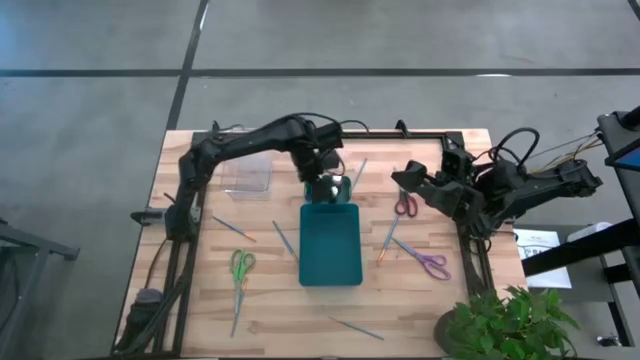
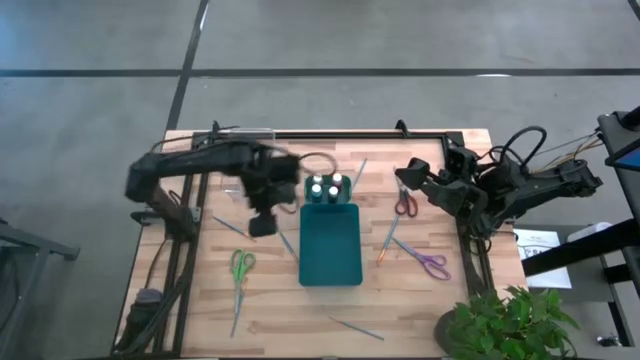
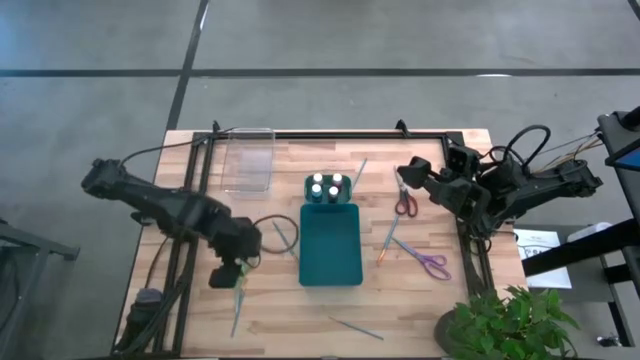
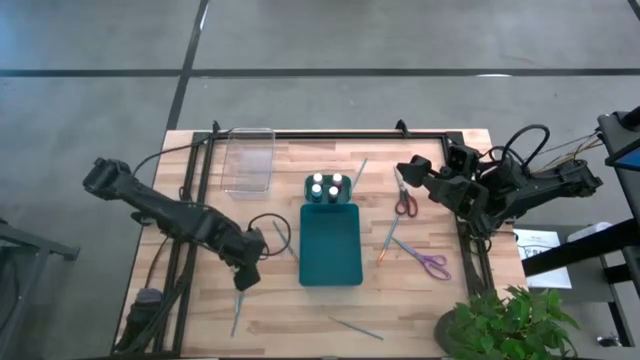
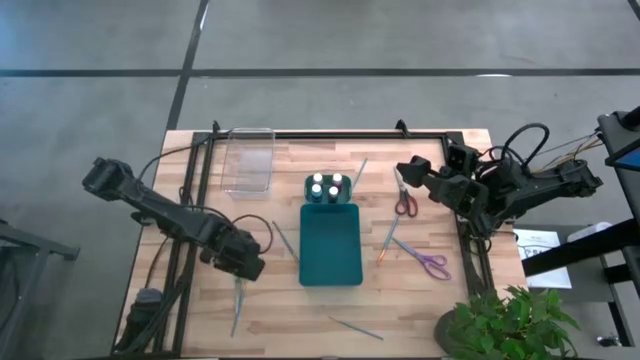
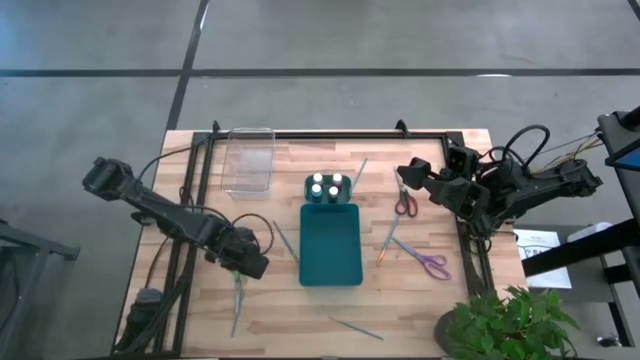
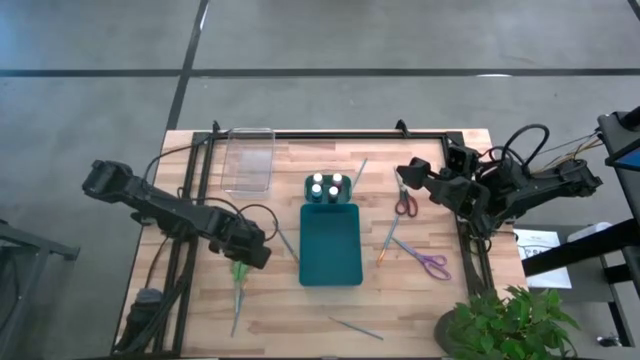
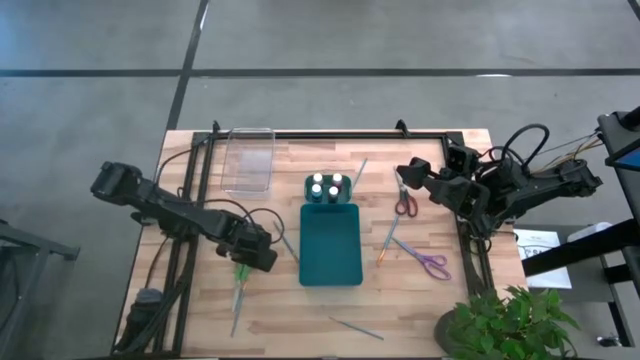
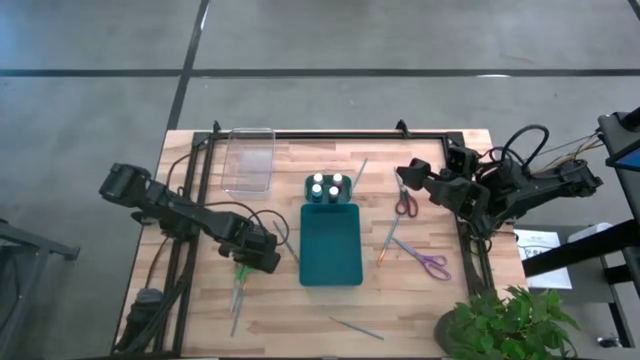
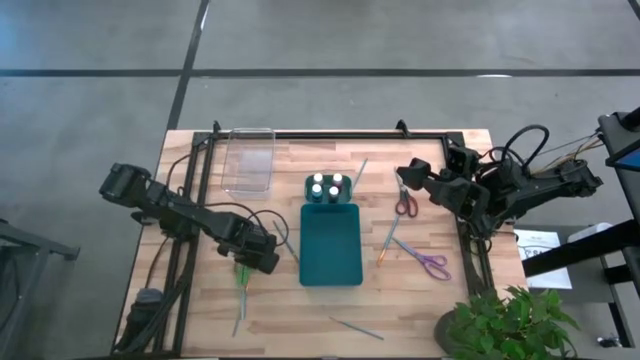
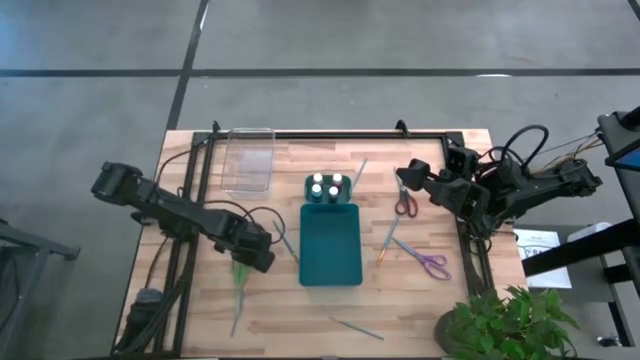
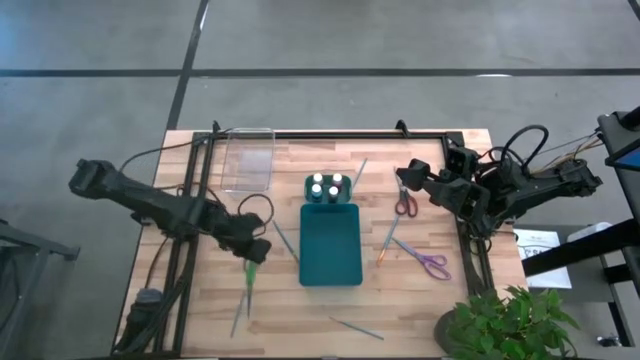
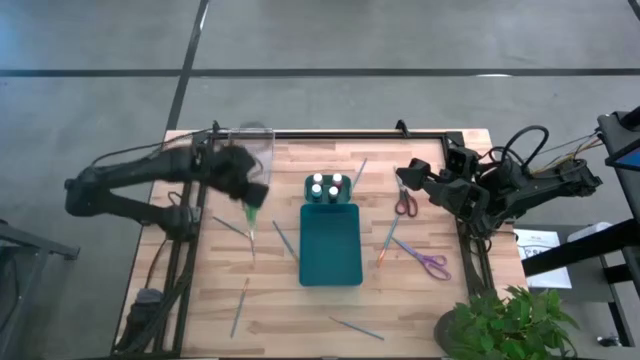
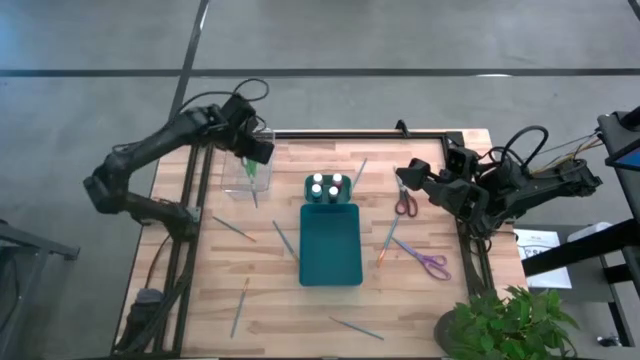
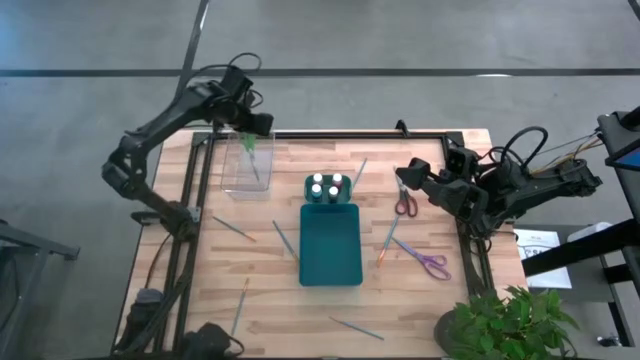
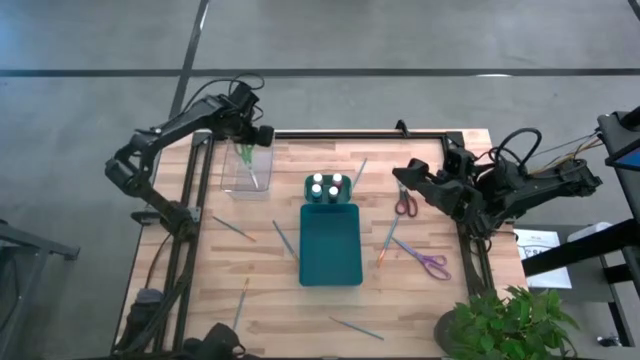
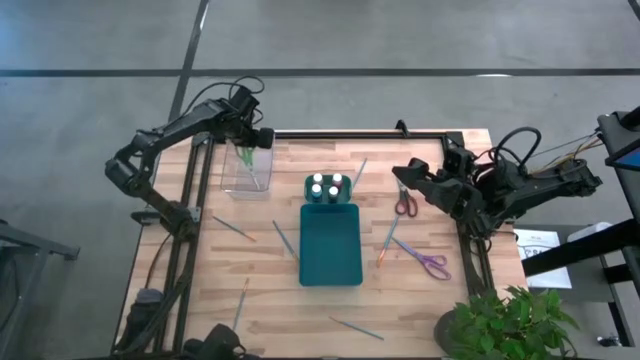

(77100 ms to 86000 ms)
Task: Pick & Place Paint Supplies
Put the green scissors into the transparent bin

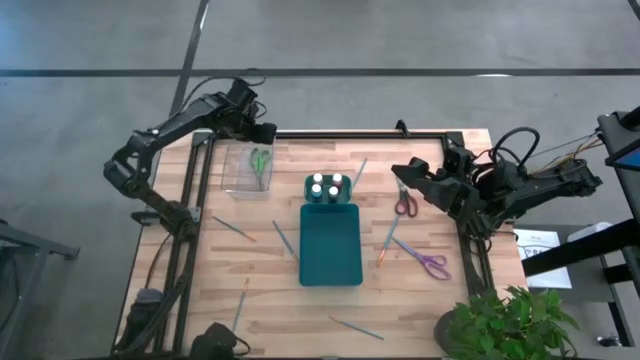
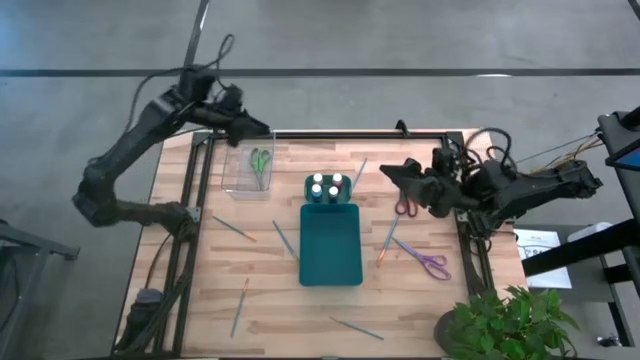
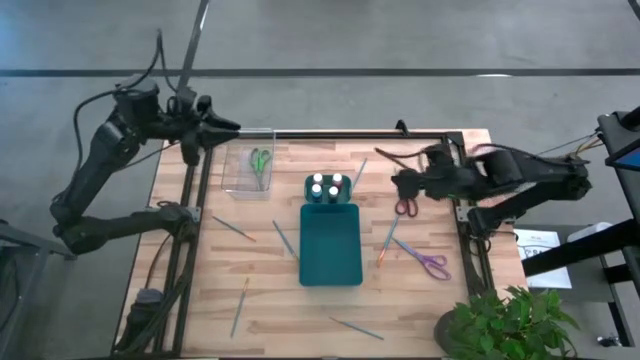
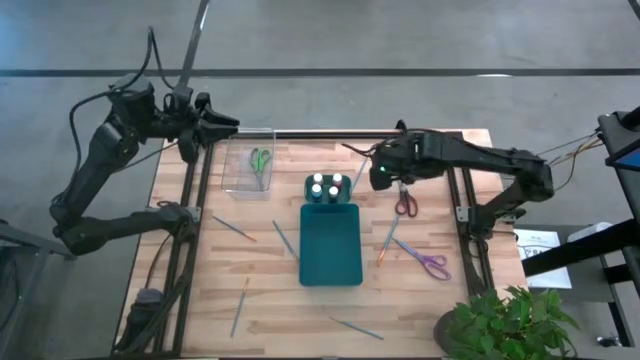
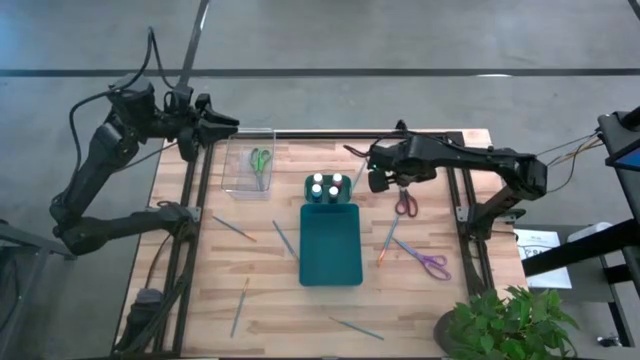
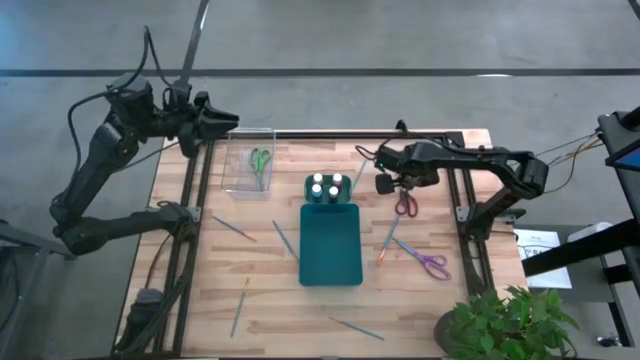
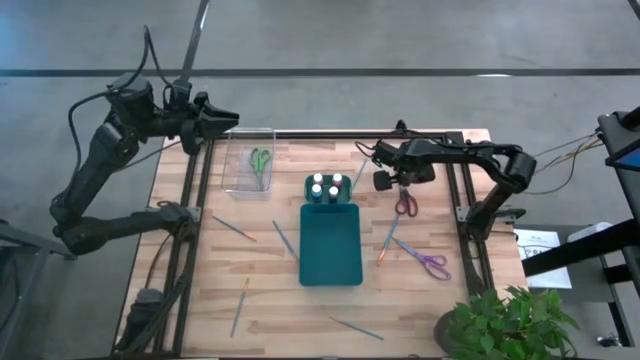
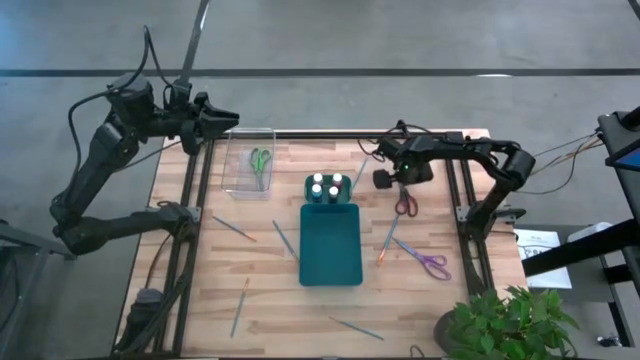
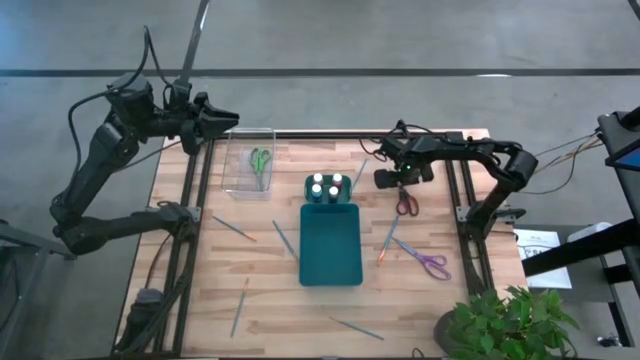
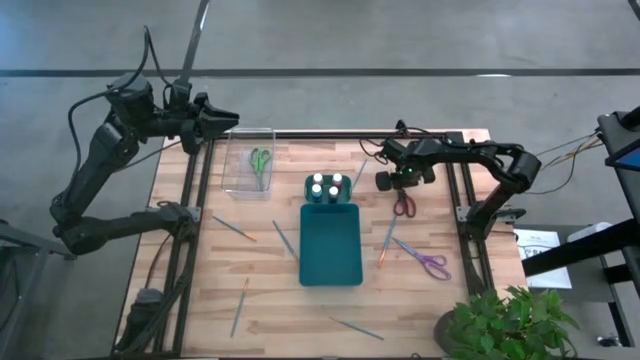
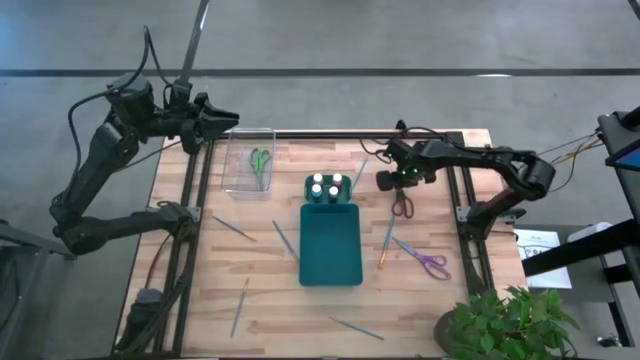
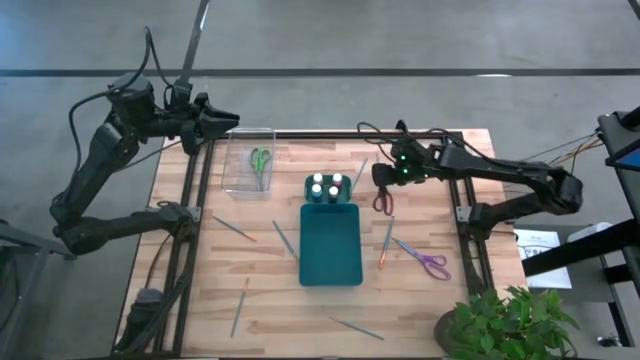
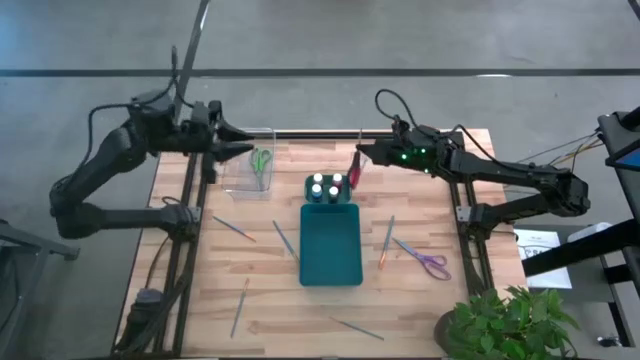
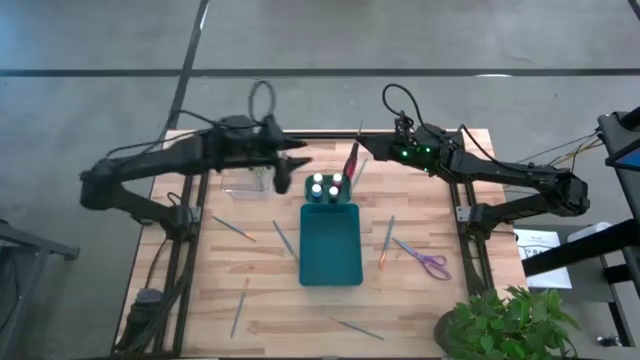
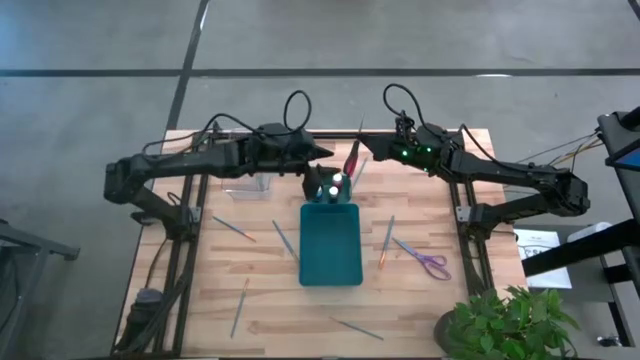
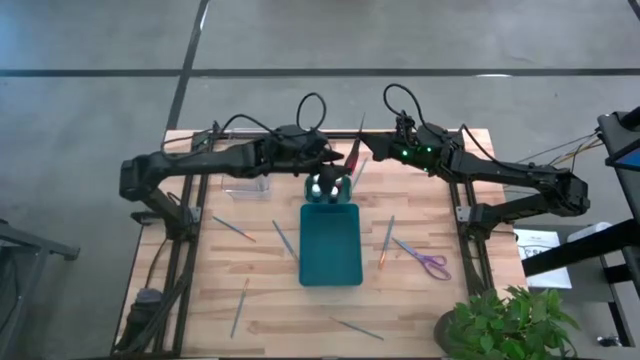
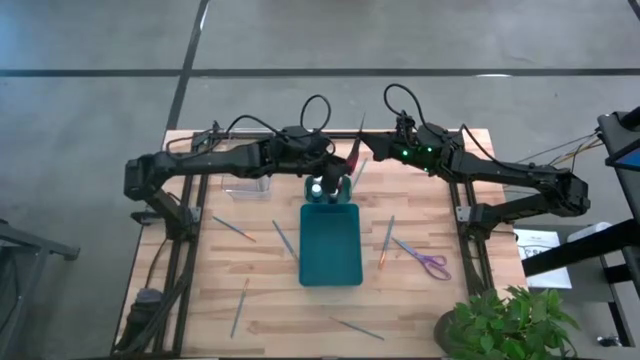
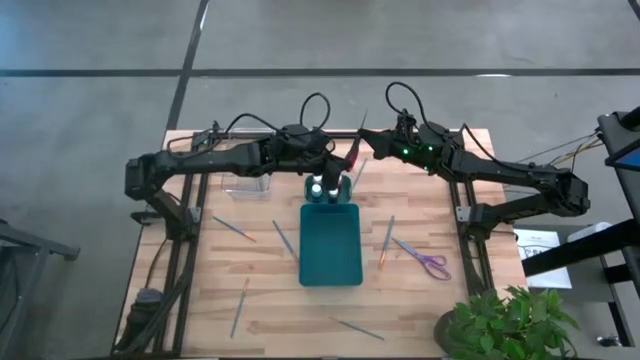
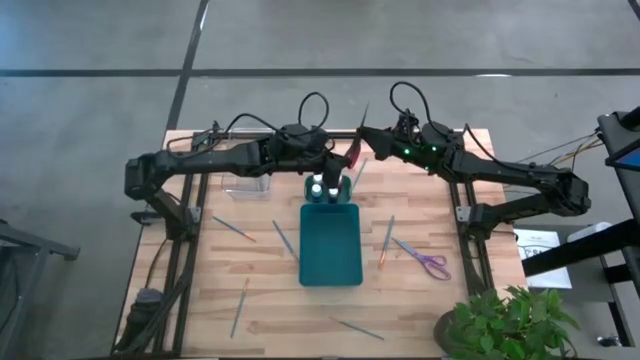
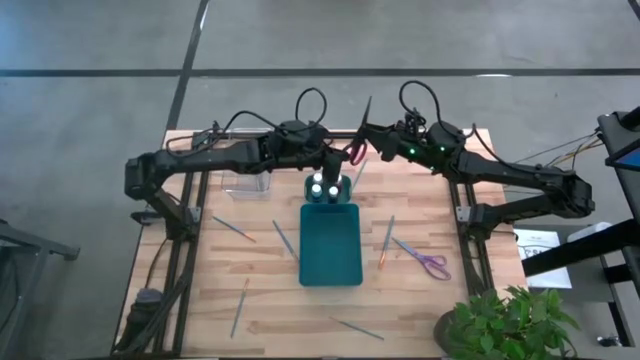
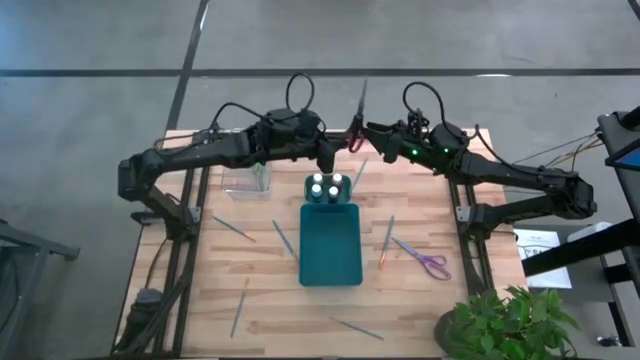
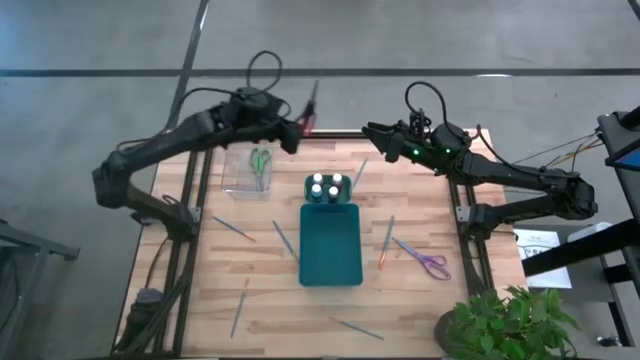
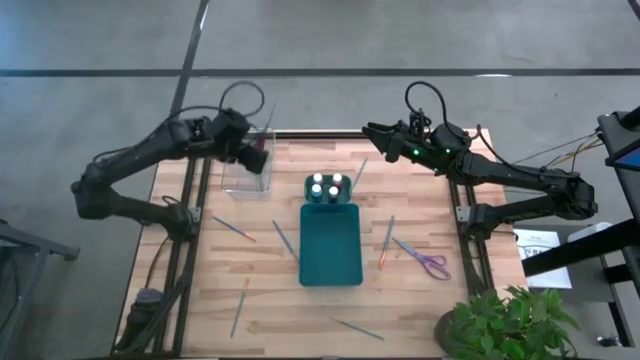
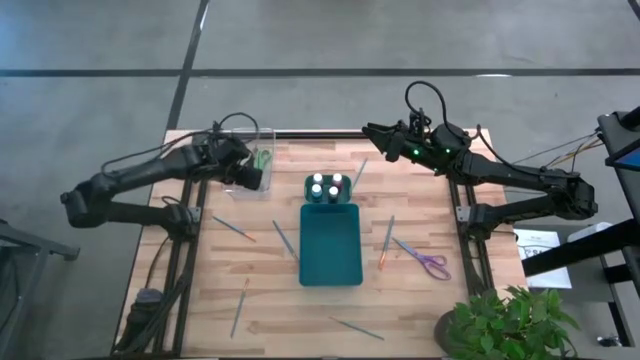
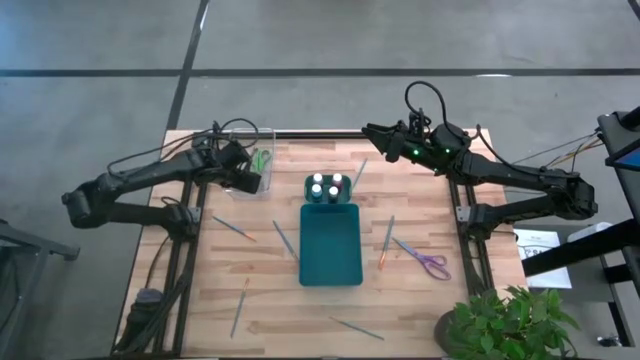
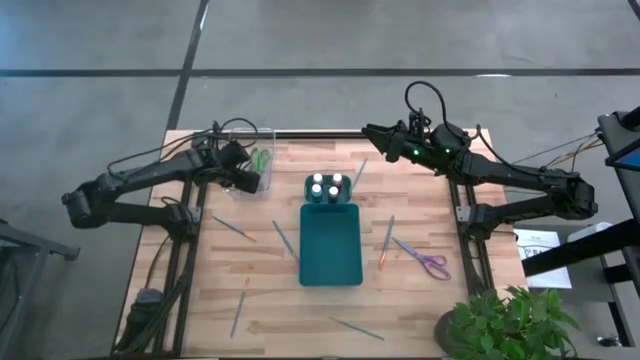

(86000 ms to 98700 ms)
Put the black scissors into the transparent bin
